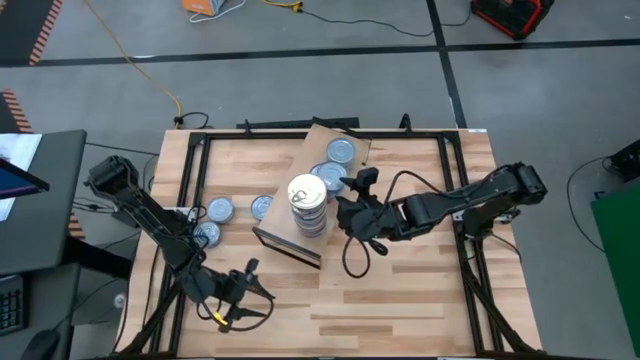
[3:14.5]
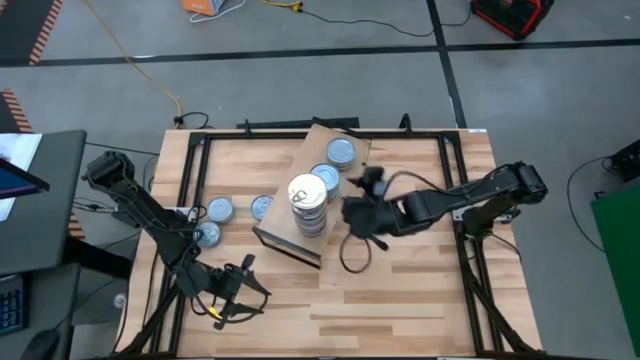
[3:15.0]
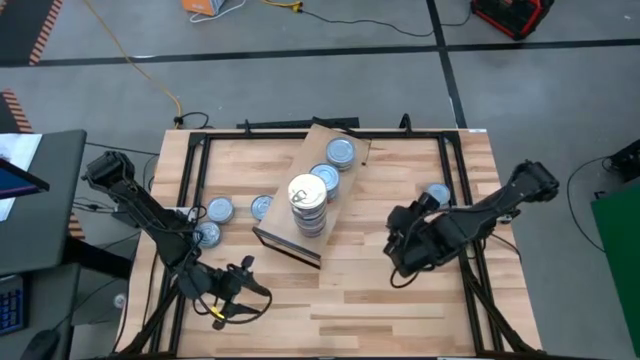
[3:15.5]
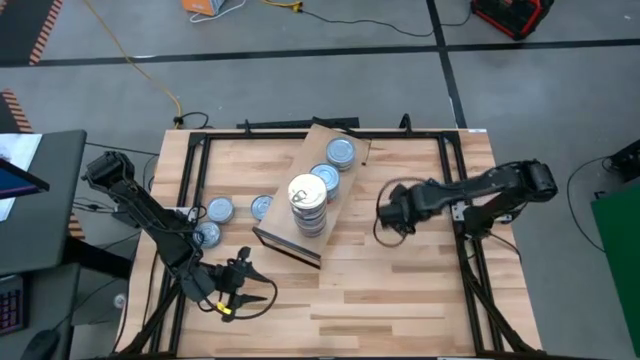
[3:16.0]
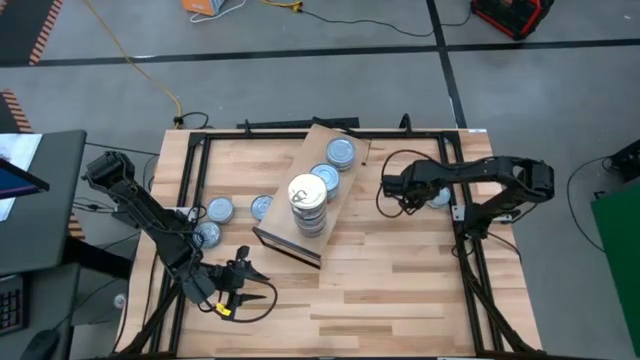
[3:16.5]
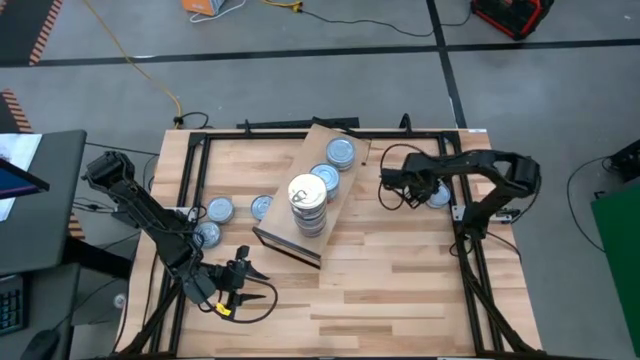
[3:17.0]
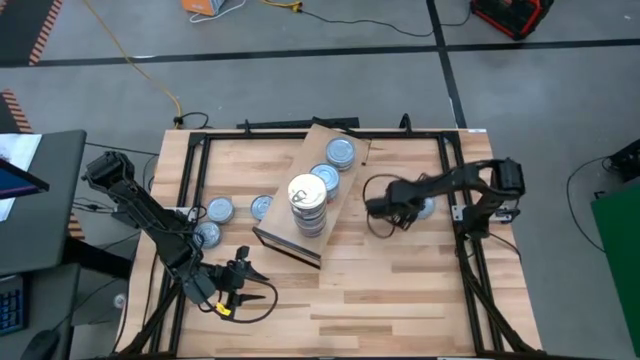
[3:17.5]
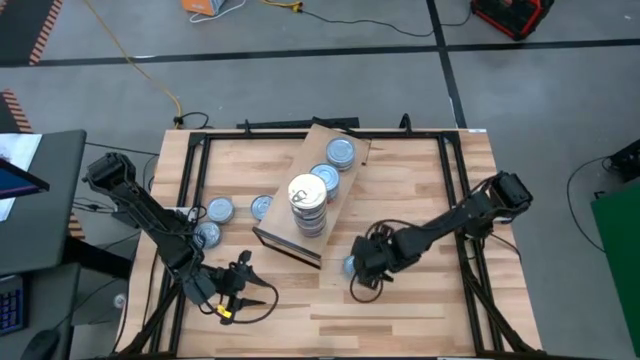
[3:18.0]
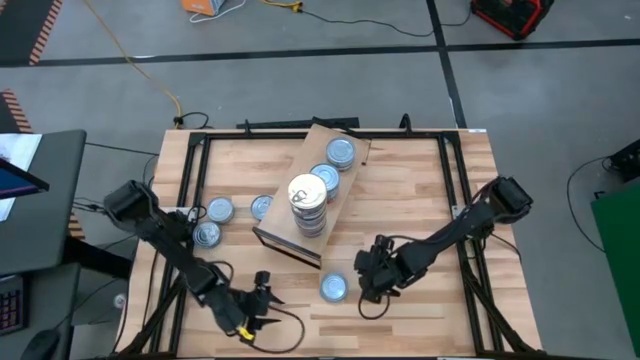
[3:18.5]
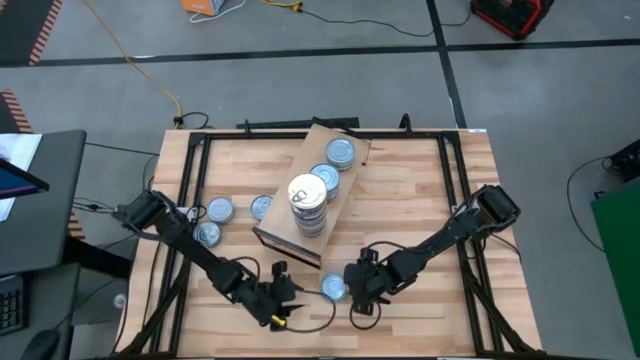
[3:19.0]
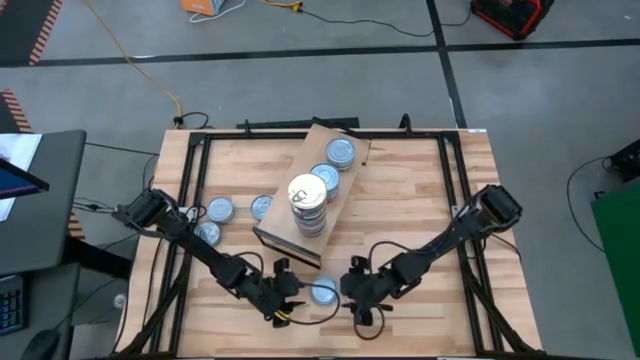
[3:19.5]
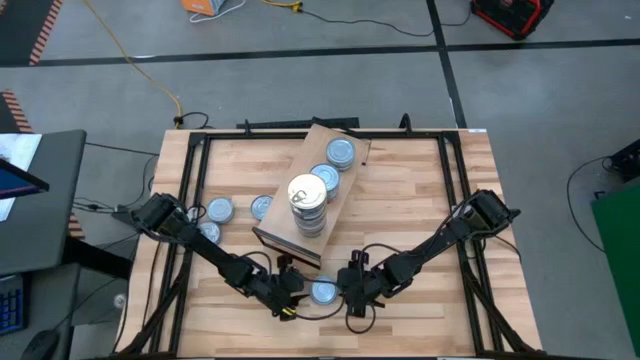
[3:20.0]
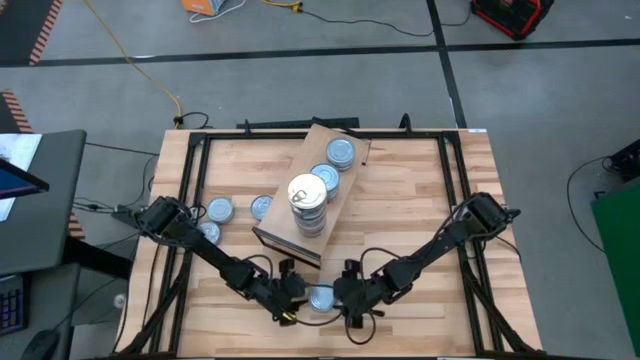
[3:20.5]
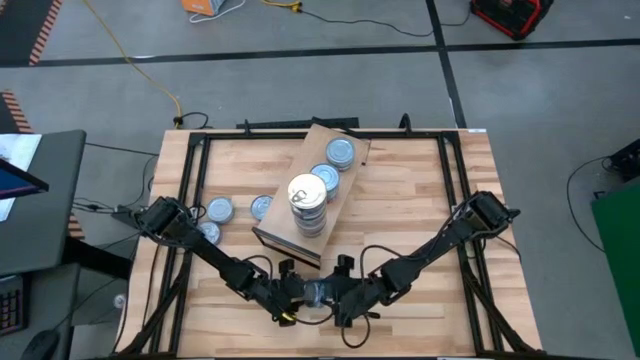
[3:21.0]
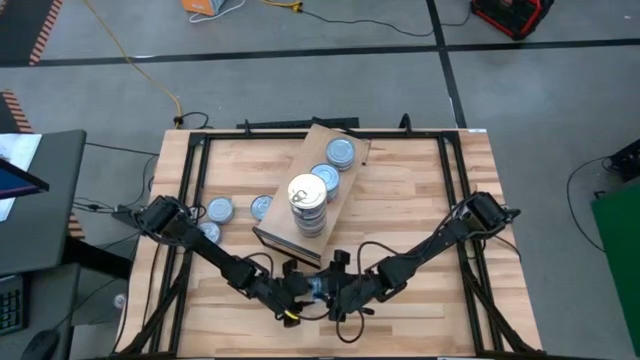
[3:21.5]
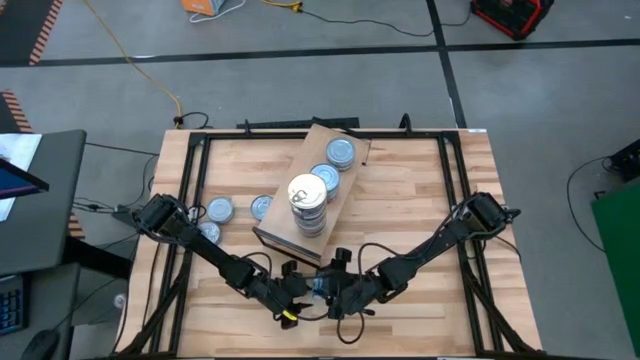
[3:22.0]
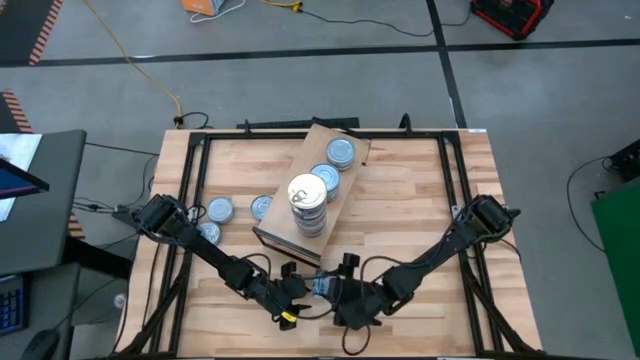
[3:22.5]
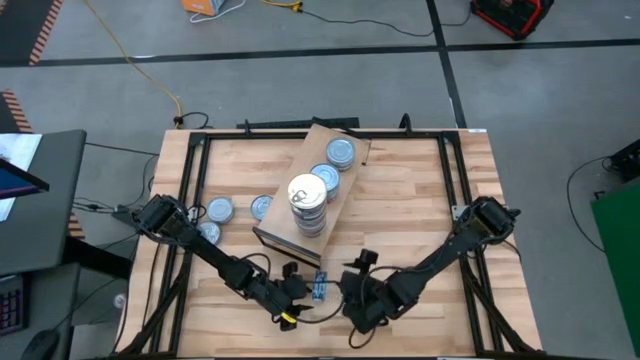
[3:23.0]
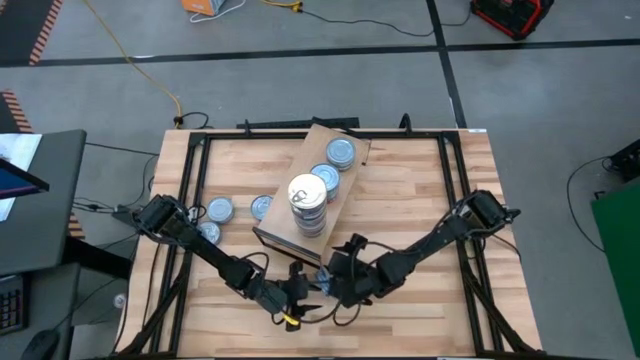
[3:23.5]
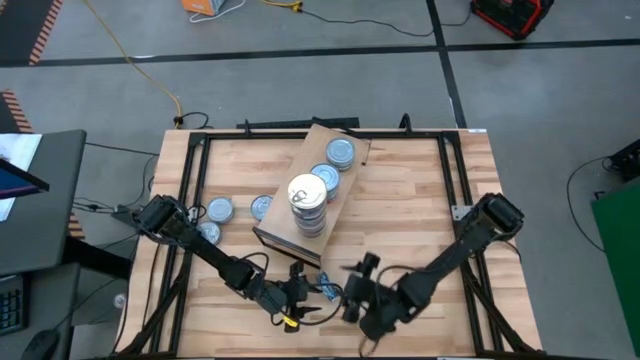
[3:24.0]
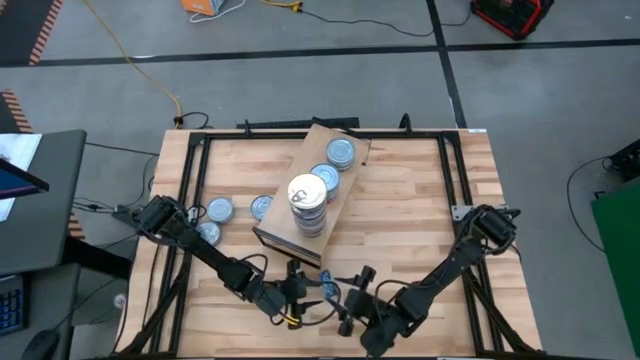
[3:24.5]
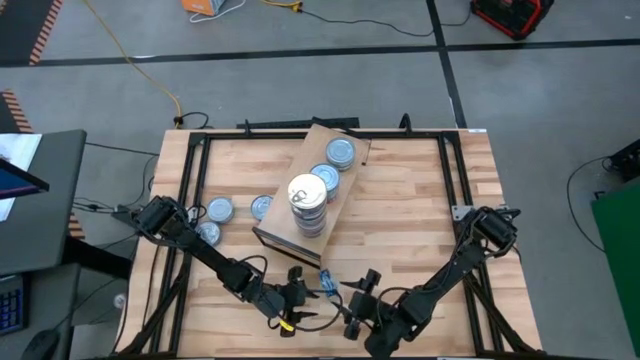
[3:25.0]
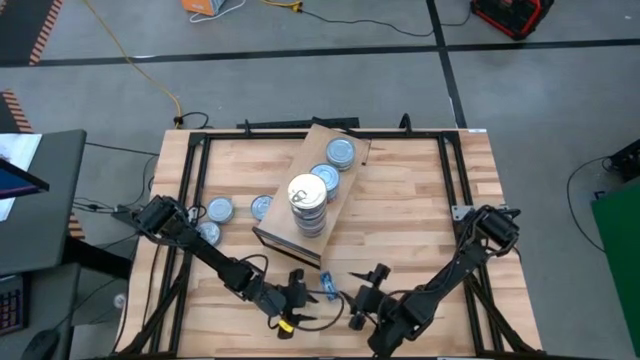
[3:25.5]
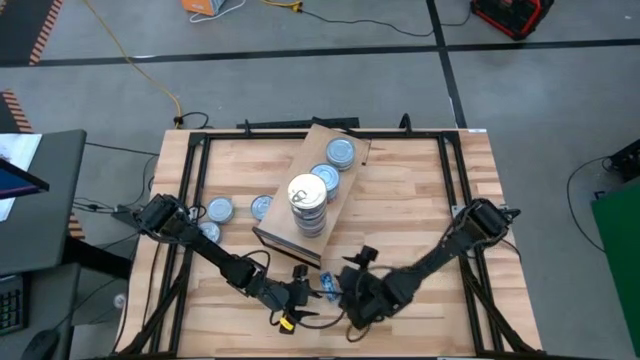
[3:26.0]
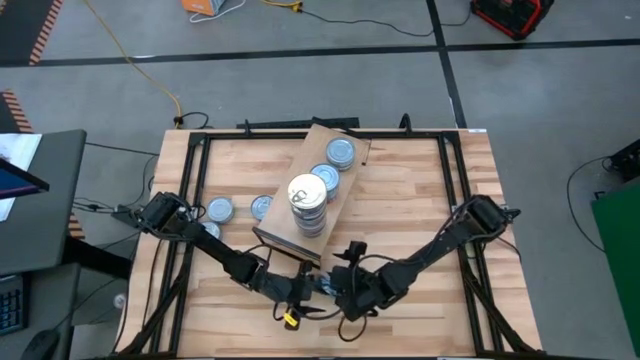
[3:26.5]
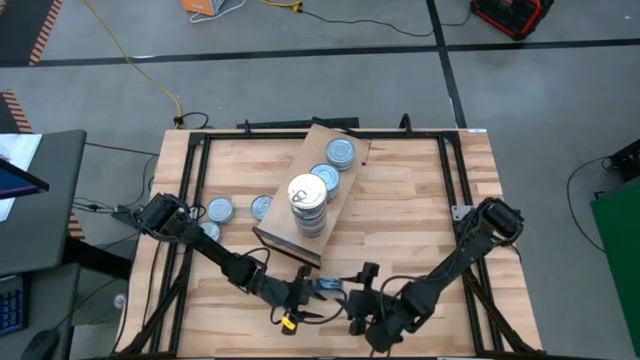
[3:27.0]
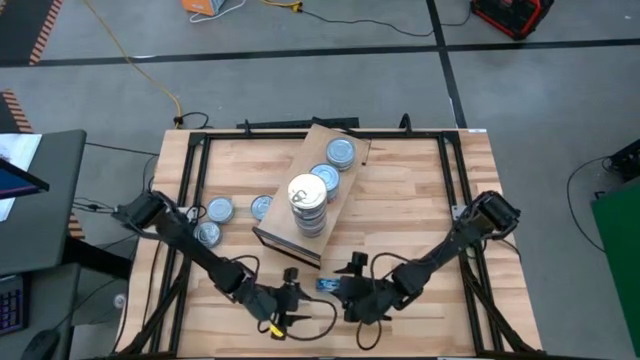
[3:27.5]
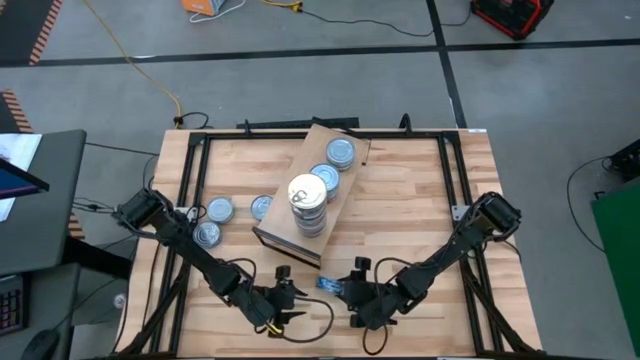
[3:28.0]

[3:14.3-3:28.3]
Task: Stack canned seafood by type on shelf
Stack the blue tuna can on top of the green tuna can on the shelf

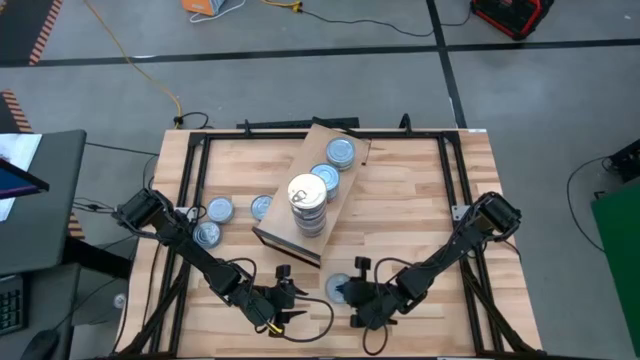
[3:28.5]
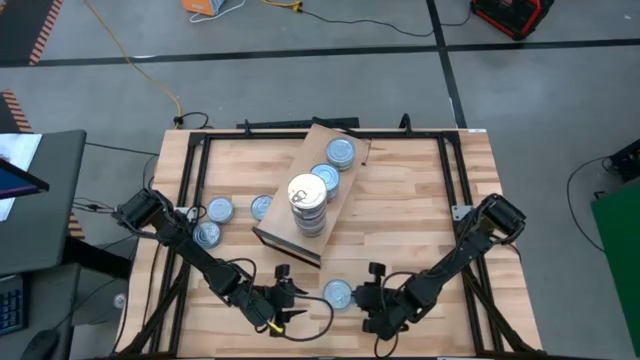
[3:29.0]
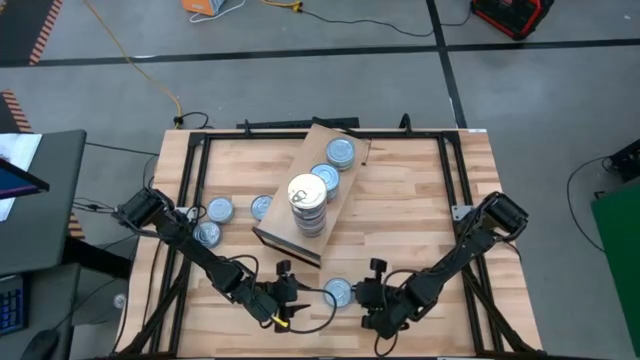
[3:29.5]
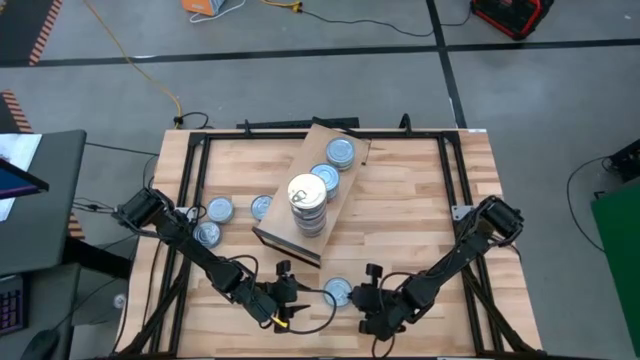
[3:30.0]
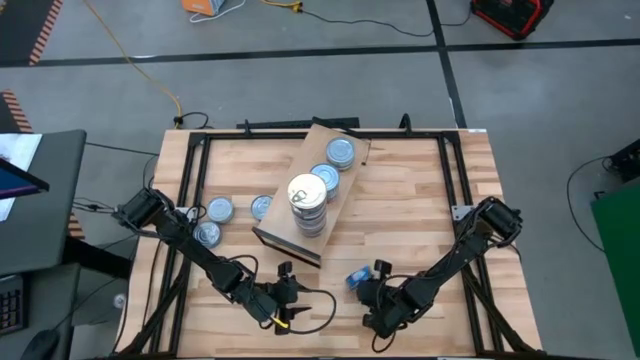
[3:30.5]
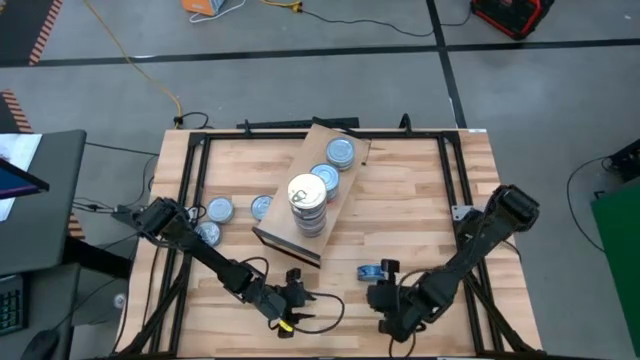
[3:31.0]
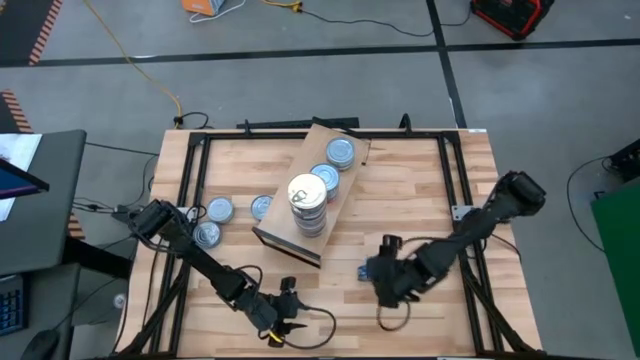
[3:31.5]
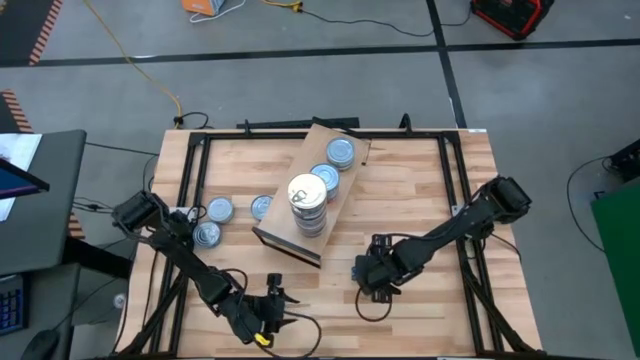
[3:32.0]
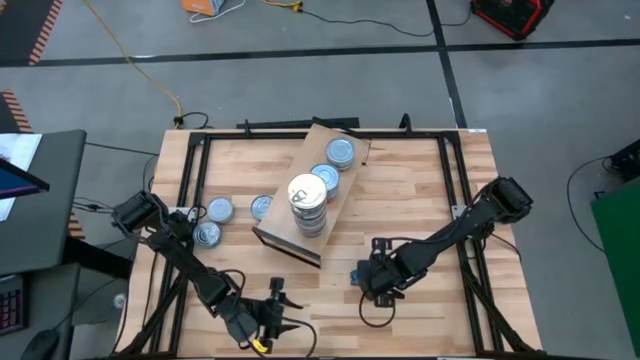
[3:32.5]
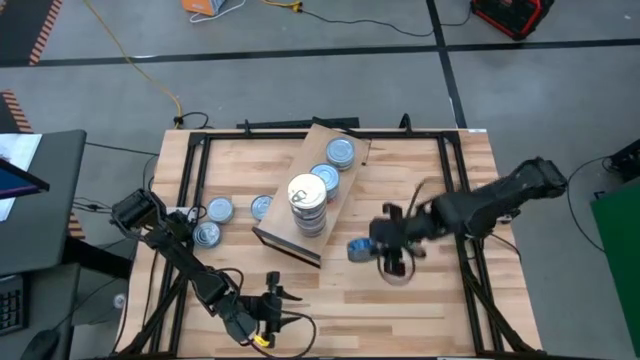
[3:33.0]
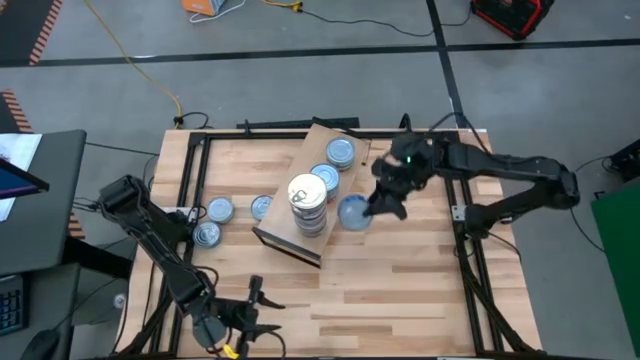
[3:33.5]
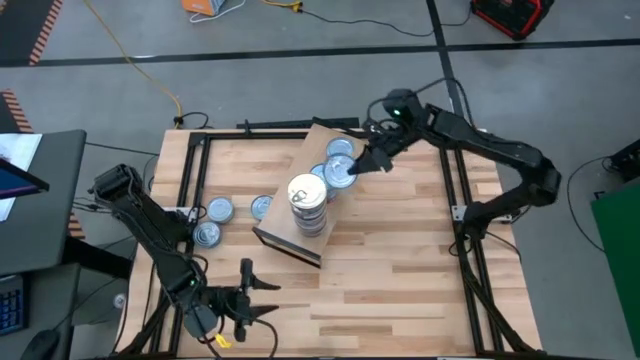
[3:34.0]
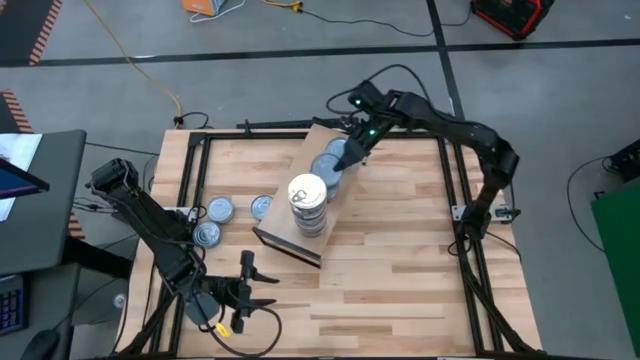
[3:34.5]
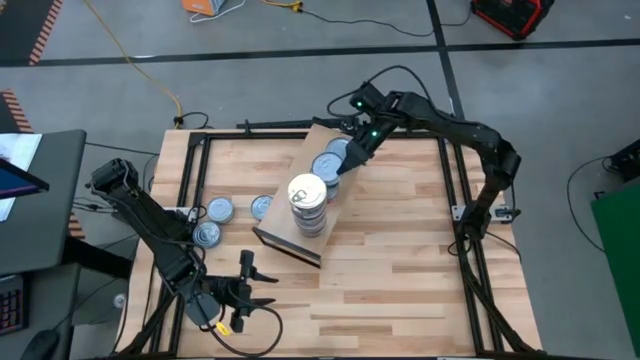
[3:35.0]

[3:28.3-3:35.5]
Stack the blue tuna can on top of the green tuna can on the shelf

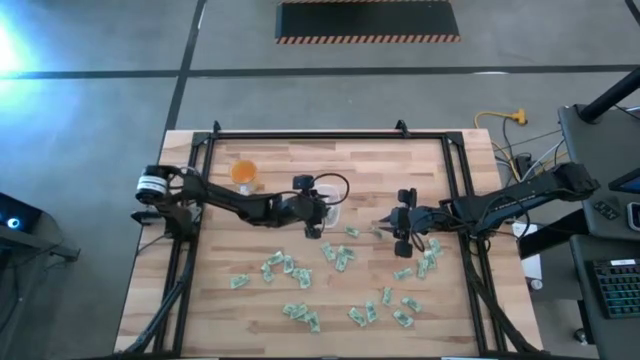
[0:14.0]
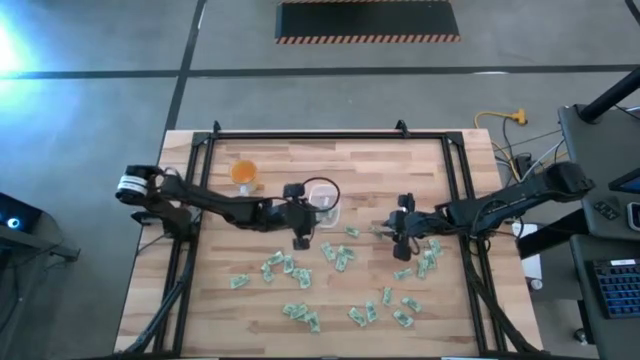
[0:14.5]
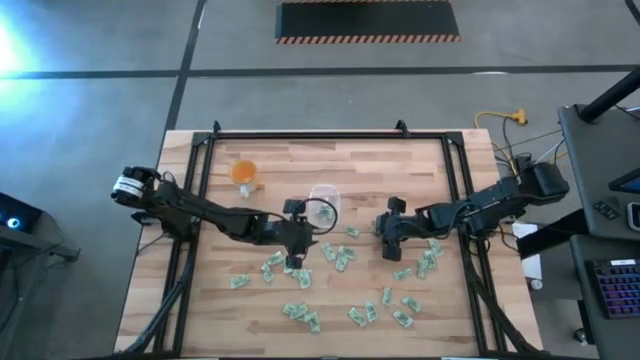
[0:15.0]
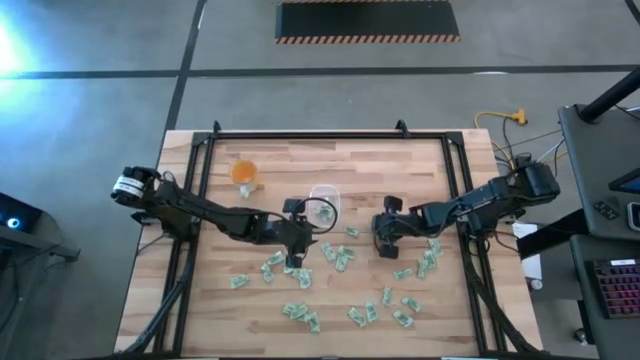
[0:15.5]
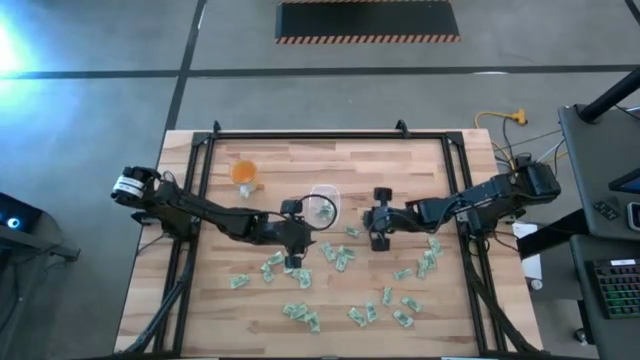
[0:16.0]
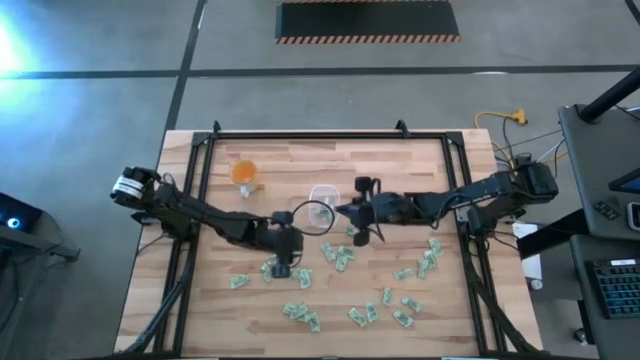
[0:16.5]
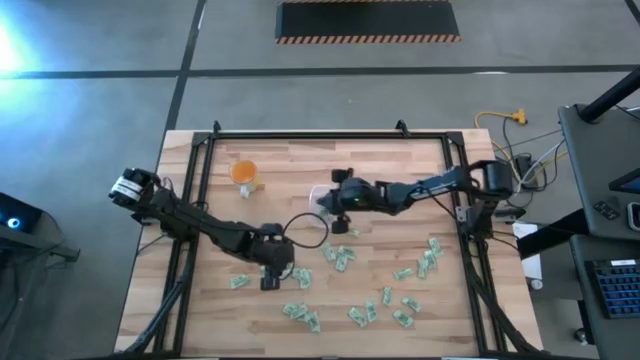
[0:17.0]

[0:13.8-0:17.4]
Task: Pick and place Stevia / Truvia into bins
Put the stevia packet into the bin
